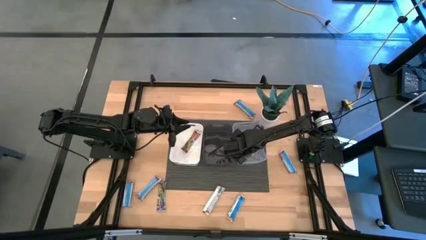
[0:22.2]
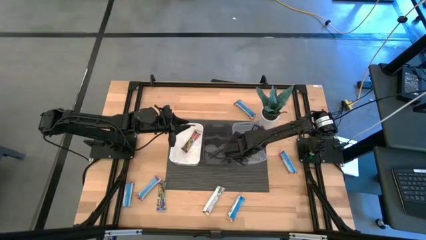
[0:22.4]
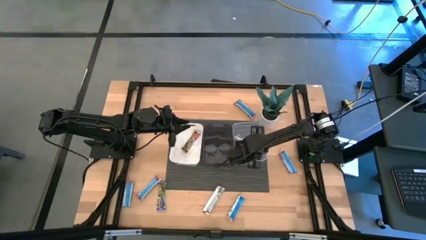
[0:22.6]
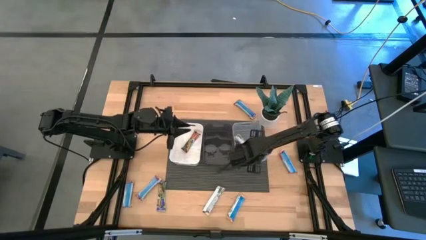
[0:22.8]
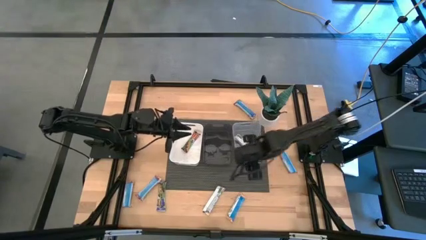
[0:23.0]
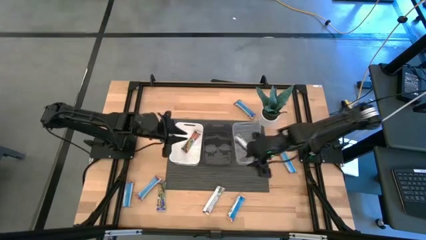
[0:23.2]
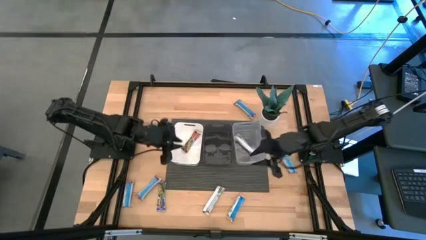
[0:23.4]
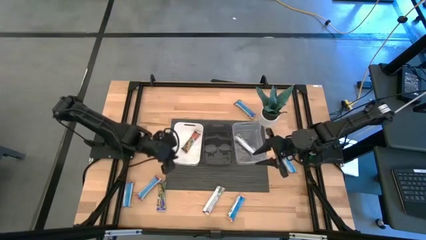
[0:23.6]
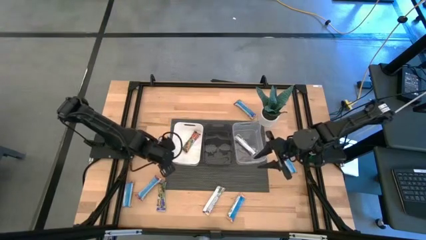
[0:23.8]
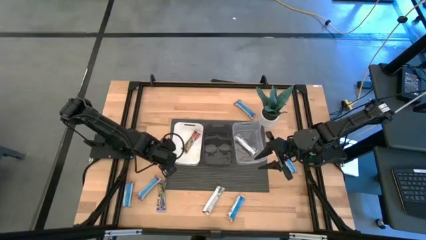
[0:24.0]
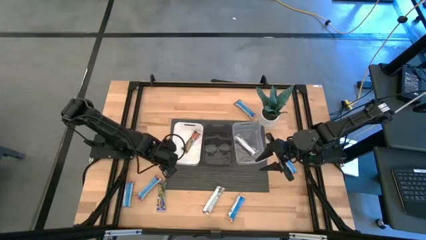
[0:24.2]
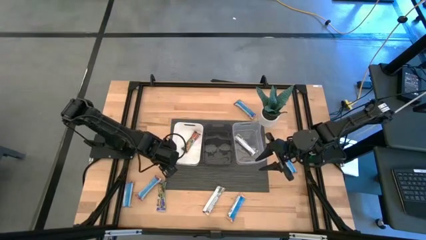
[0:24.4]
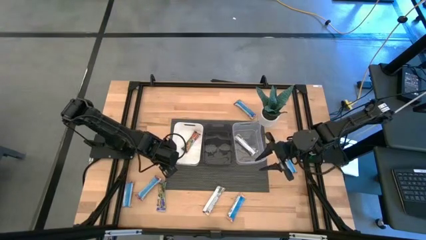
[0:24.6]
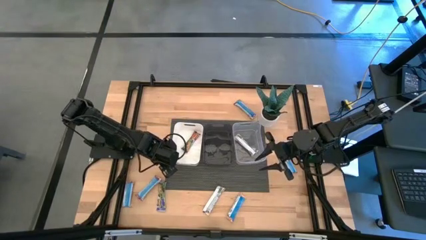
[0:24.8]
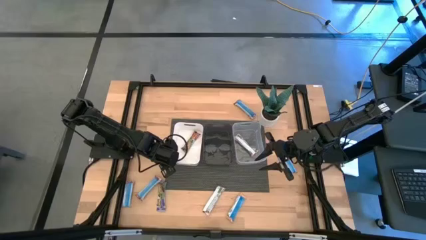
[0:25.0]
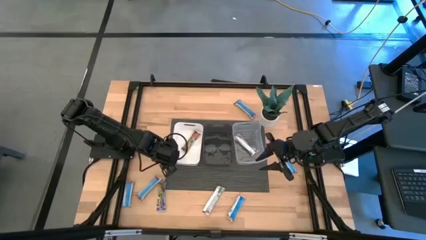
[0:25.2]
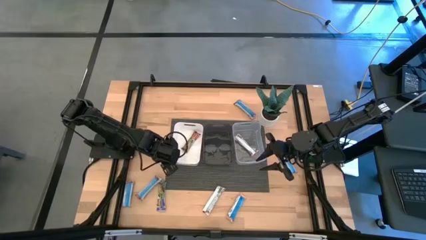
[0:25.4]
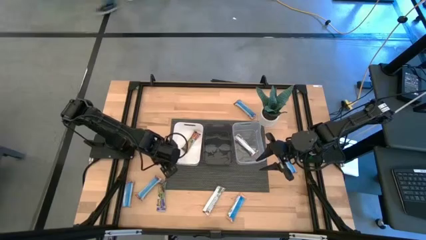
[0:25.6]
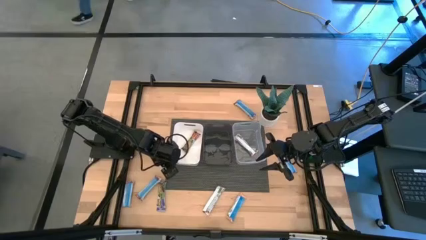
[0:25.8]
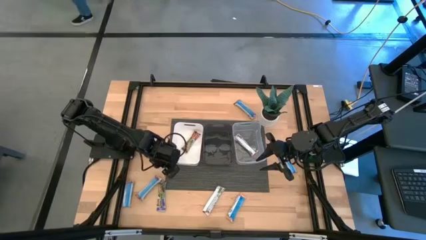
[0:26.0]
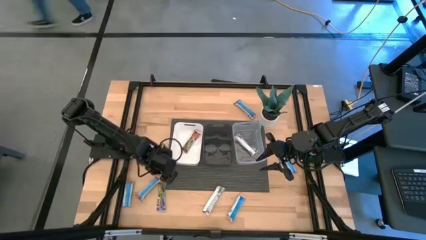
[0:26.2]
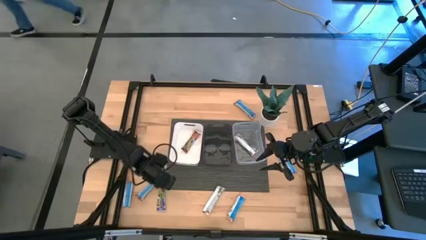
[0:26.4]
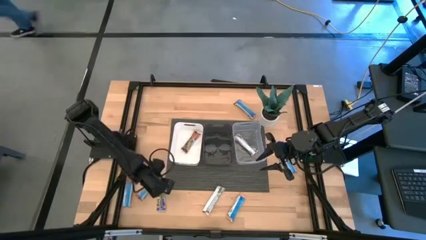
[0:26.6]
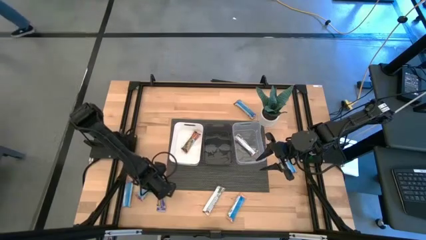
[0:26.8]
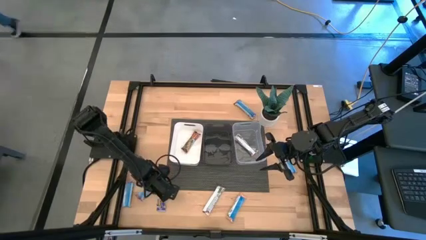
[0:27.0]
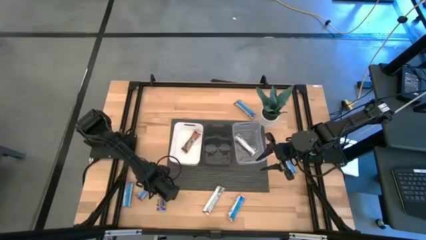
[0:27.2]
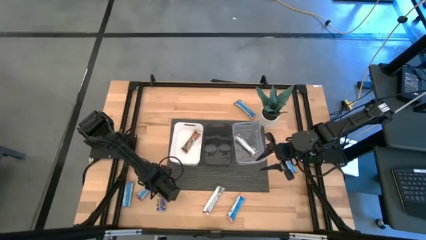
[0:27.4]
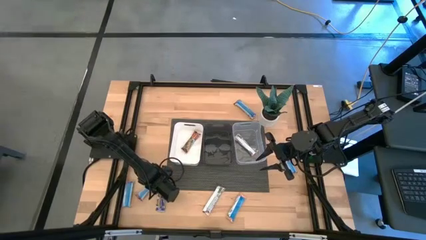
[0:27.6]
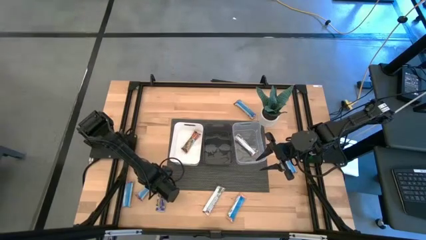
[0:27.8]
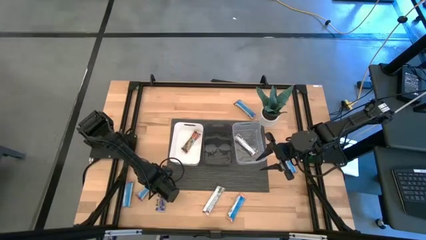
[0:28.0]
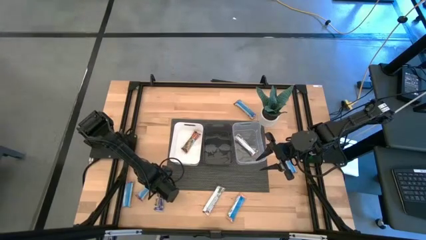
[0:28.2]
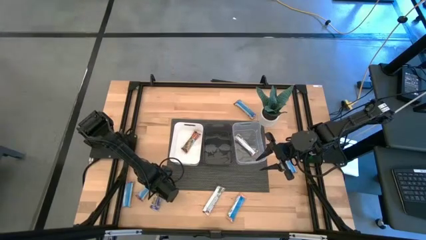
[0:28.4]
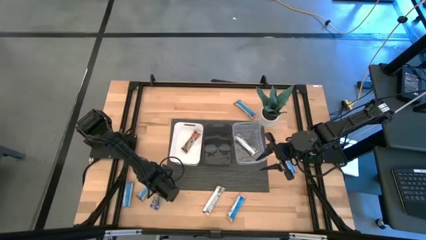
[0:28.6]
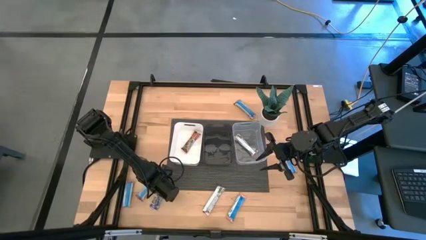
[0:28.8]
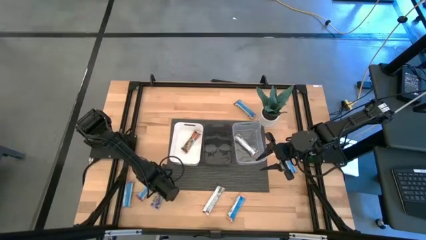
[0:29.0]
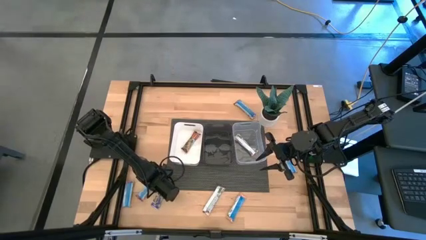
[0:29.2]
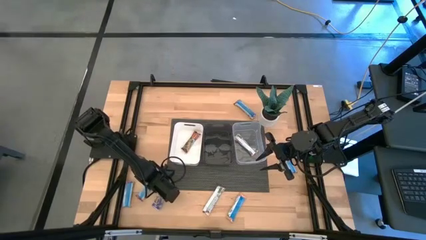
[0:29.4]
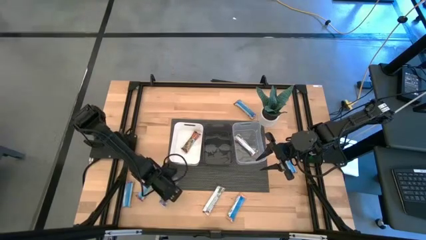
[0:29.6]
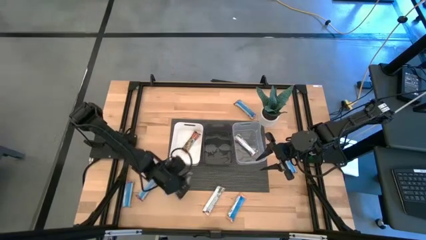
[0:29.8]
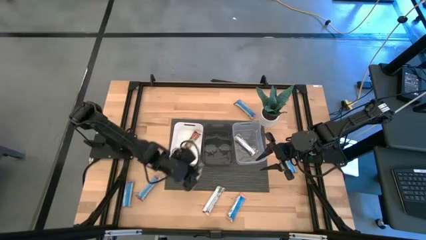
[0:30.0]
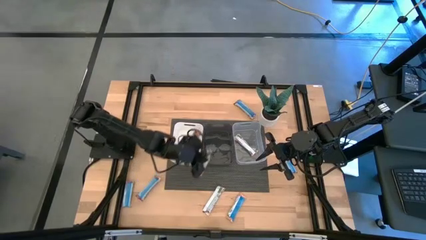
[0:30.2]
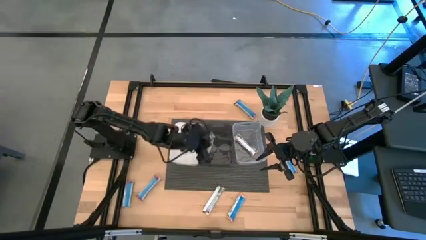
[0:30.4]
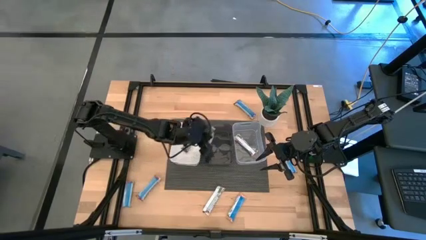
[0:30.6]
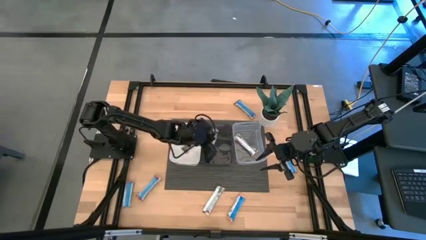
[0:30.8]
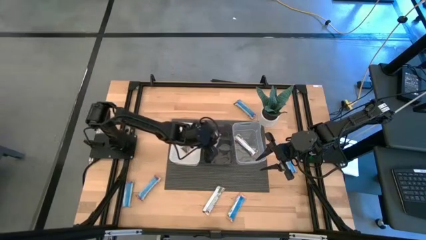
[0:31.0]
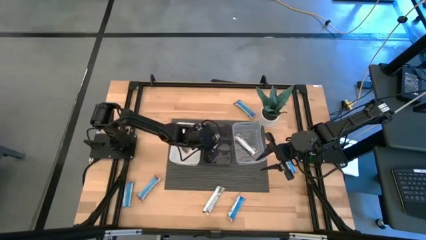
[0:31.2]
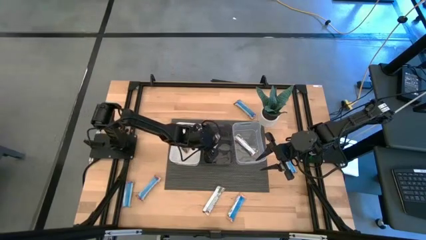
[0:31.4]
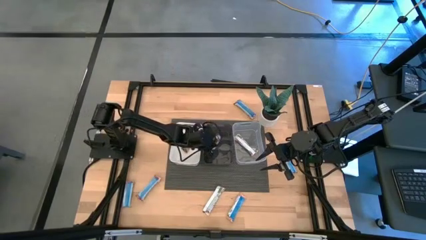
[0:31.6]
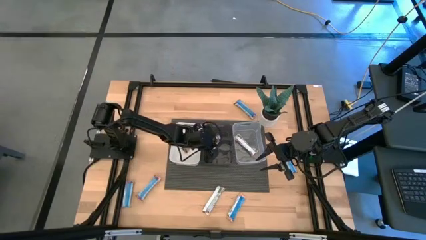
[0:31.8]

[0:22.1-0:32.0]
Task: Pick and place Granola Bars by type
Put the blue granola bar into the black bin

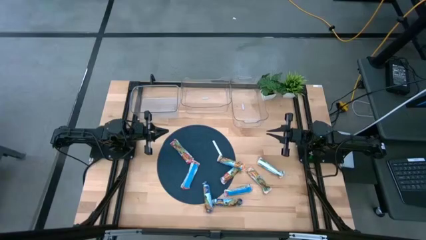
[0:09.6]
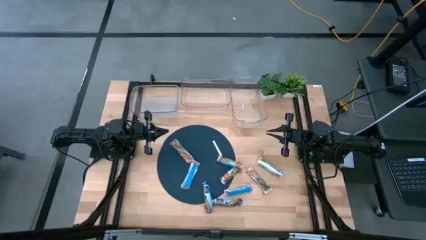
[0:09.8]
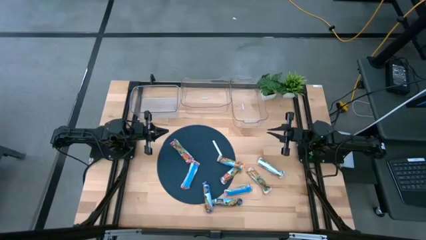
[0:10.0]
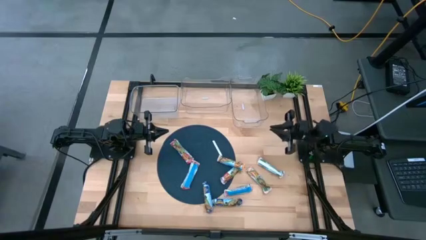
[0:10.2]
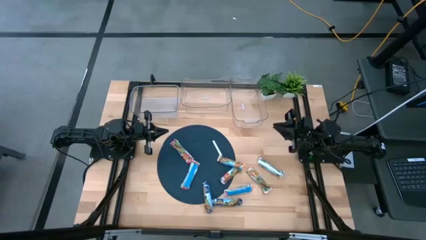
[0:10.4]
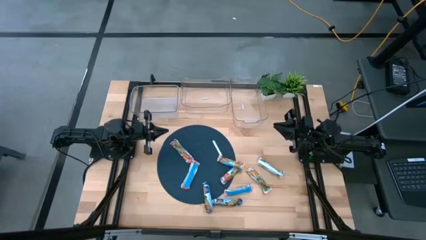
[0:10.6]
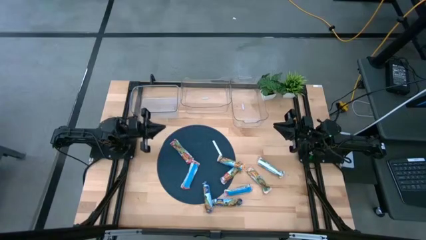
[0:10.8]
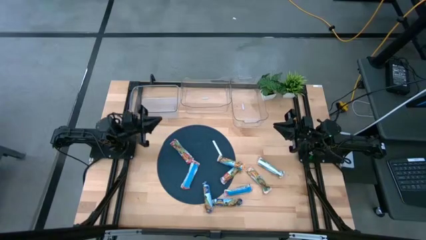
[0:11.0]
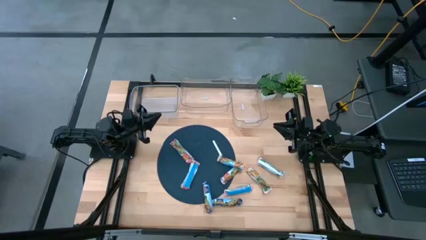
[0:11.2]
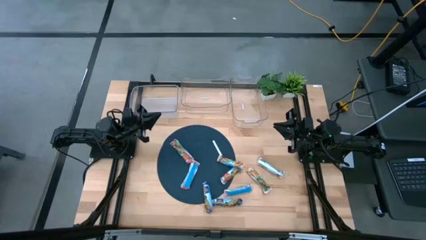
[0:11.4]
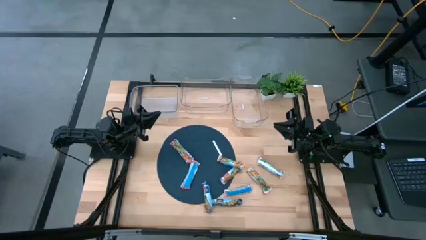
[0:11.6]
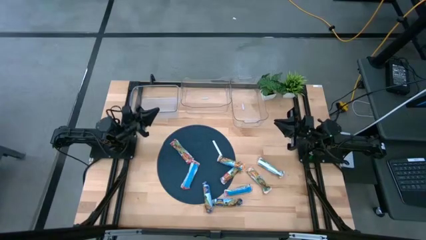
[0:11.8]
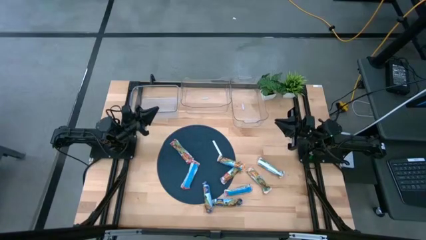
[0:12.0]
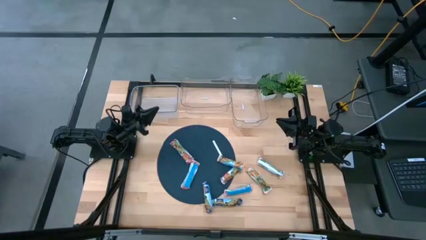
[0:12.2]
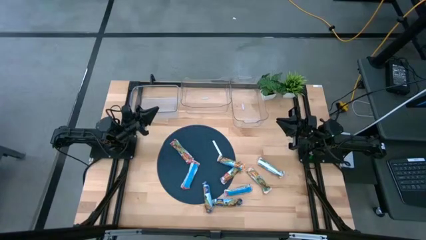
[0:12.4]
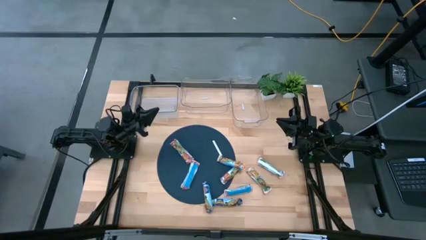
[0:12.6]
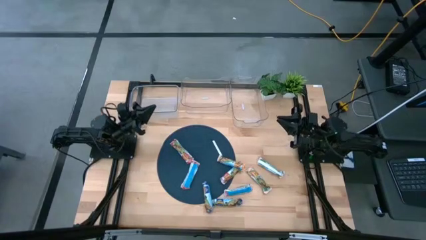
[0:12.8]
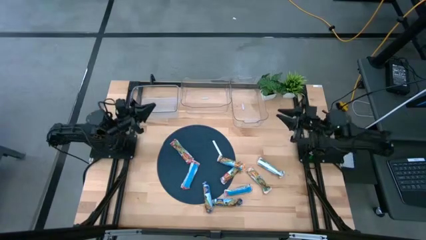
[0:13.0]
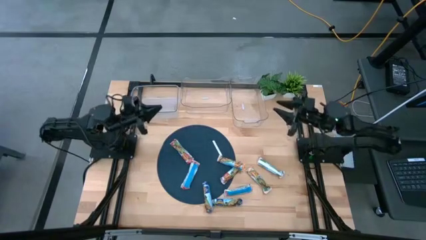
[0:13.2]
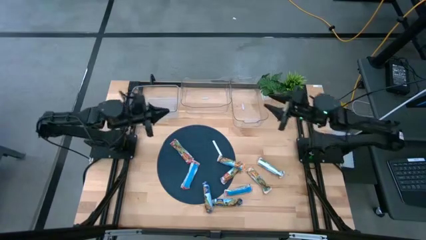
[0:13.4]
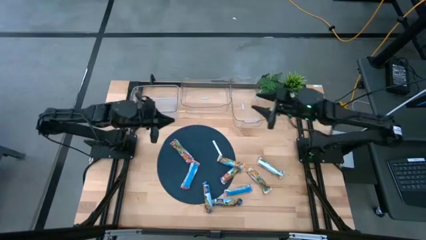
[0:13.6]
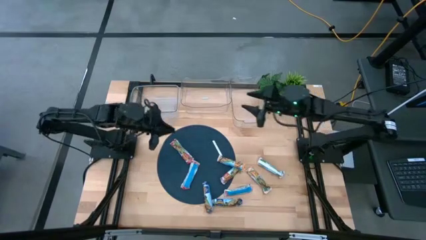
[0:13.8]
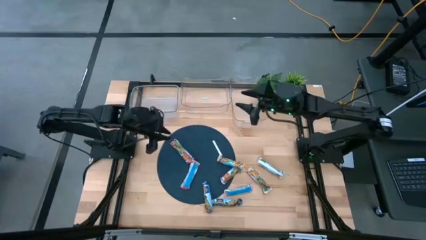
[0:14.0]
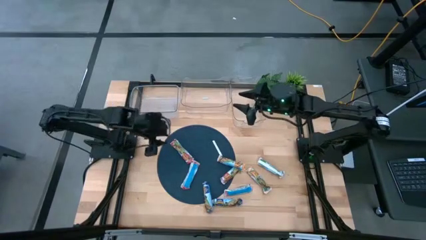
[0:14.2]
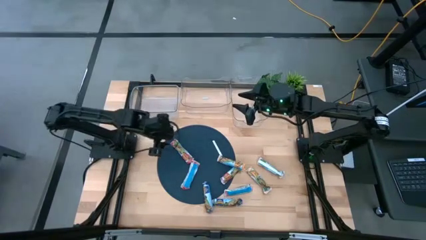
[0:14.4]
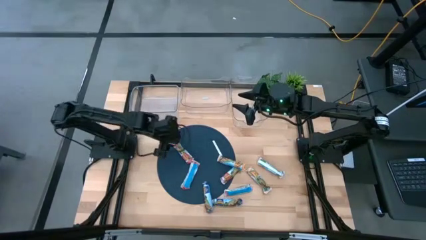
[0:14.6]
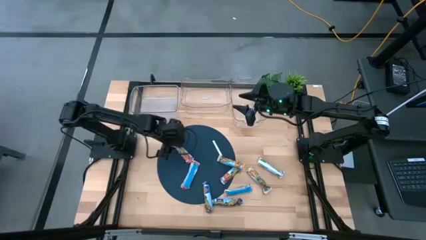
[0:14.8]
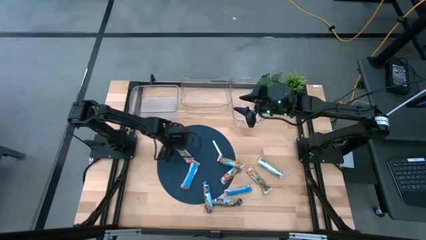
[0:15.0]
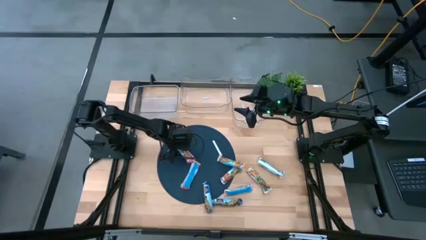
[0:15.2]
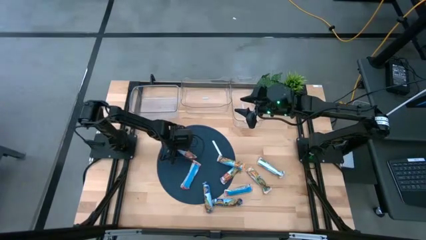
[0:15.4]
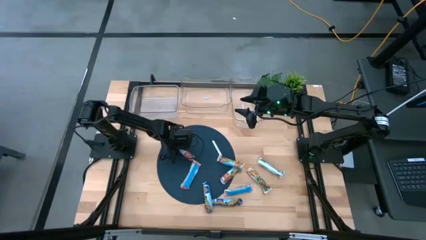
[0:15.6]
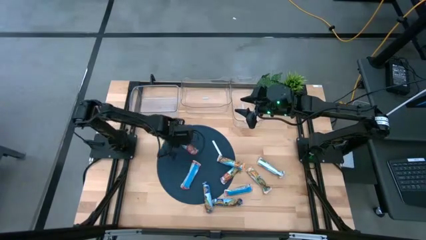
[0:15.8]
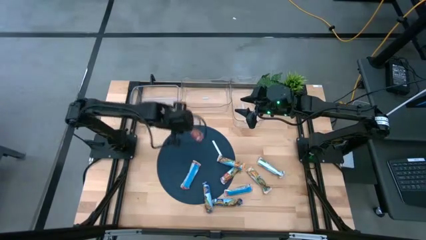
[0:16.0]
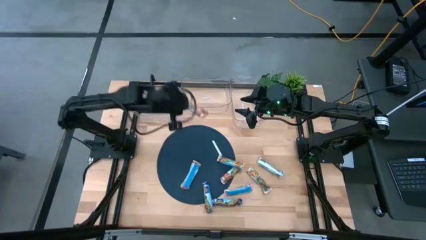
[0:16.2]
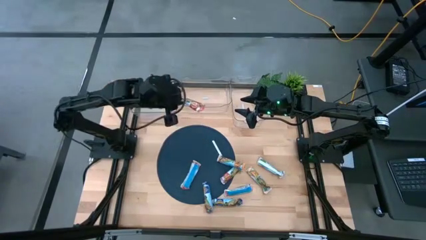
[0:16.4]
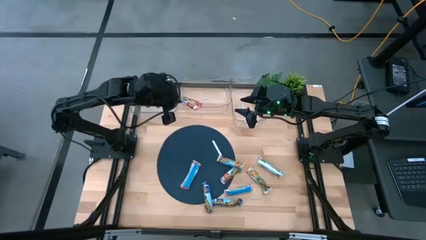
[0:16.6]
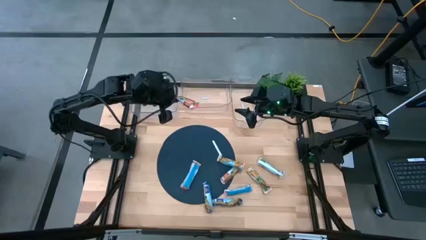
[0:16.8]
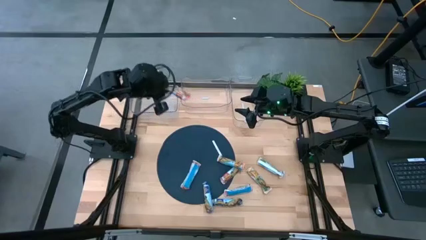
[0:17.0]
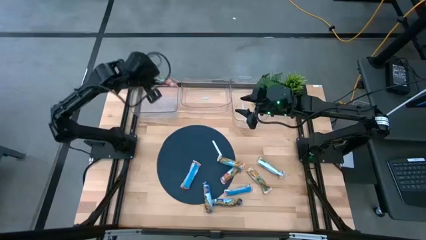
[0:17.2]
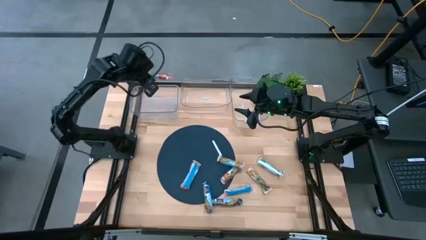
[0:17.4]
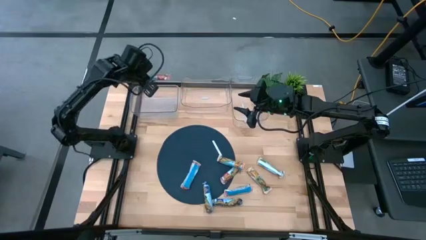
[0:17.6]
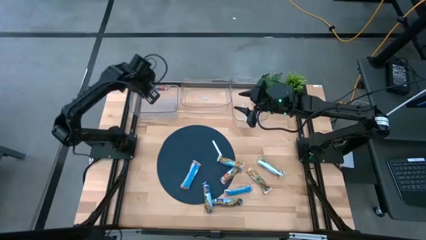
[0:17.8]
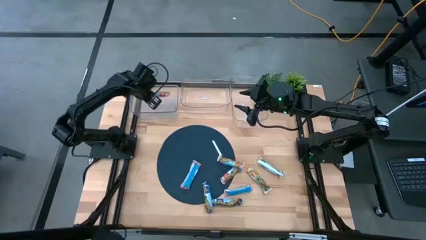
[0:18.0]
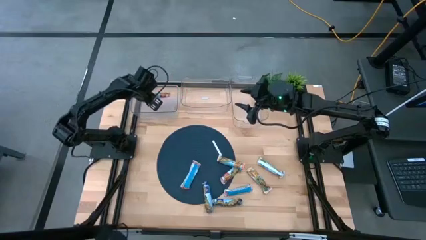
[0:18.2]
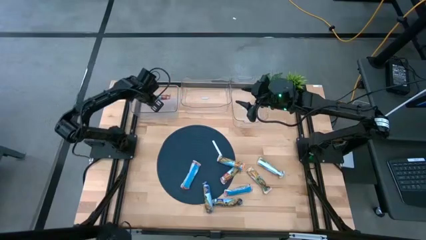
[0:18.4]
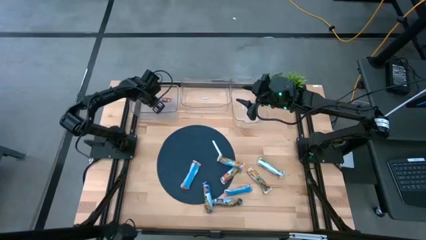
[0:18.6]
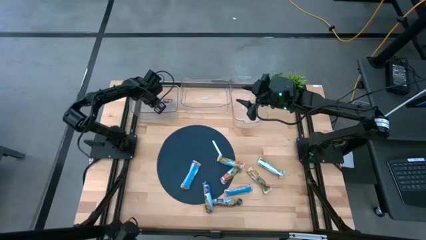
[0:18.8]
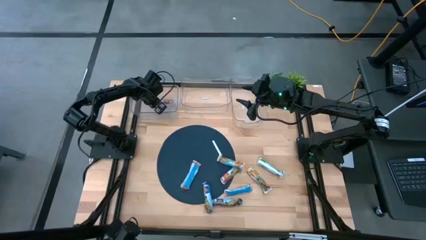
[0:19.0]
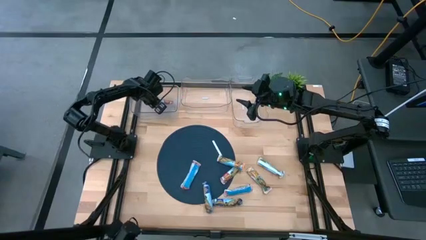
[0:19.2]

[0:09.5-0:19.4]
Task: Pick and place Granola Bars by type
Put the red chewy bar into the top left transparent bin
